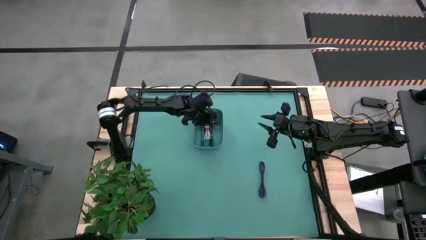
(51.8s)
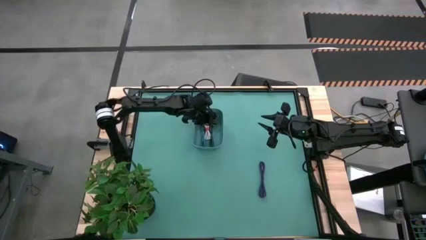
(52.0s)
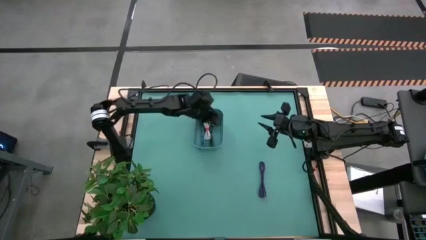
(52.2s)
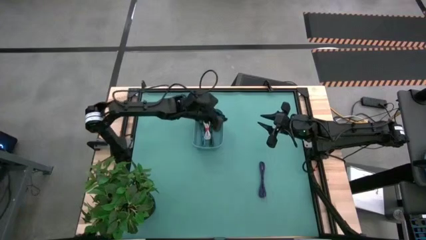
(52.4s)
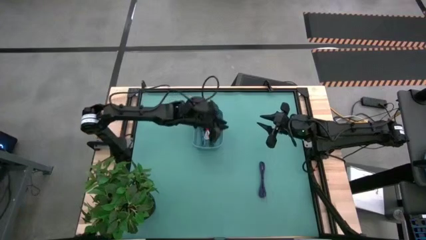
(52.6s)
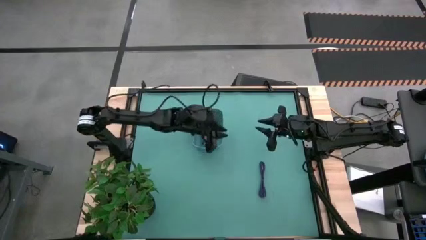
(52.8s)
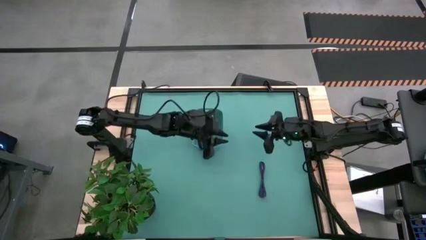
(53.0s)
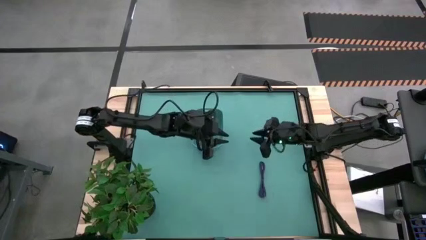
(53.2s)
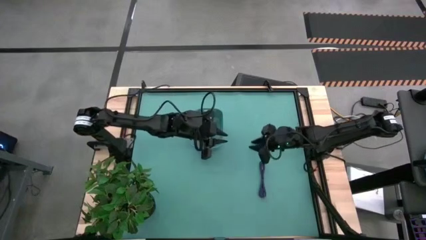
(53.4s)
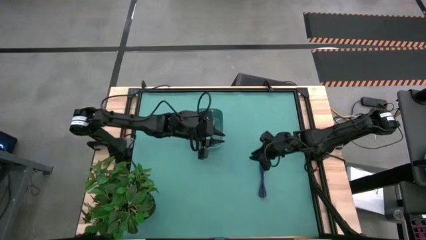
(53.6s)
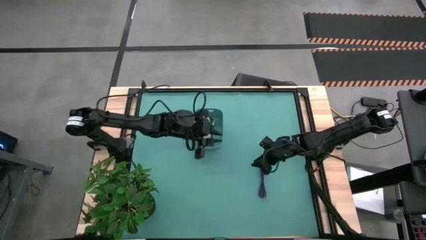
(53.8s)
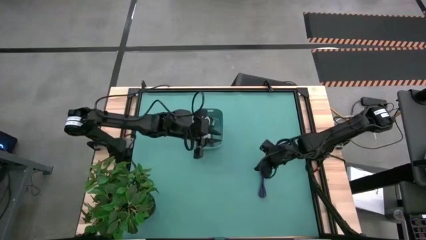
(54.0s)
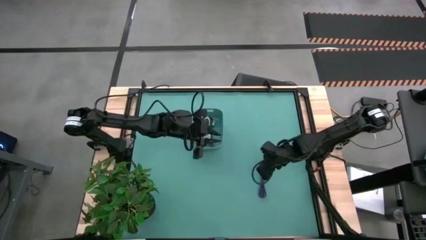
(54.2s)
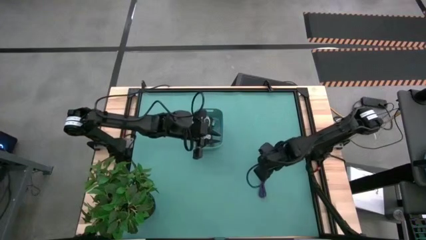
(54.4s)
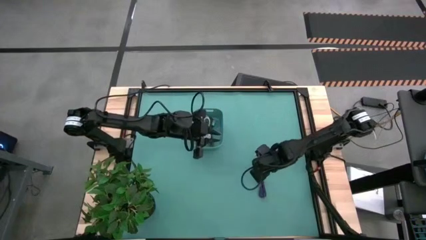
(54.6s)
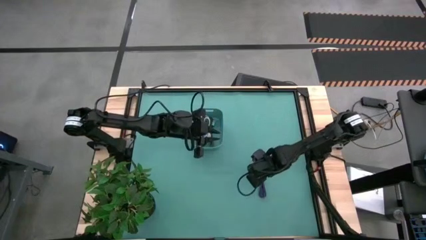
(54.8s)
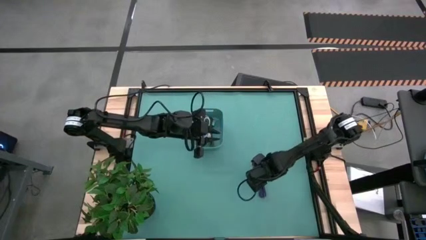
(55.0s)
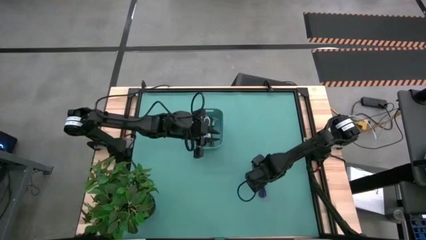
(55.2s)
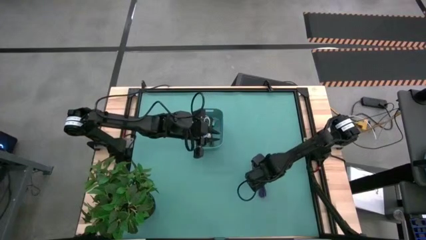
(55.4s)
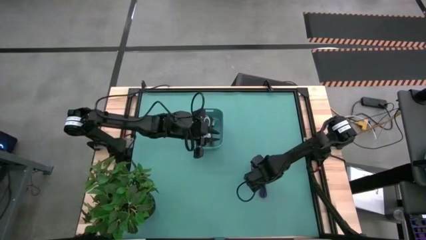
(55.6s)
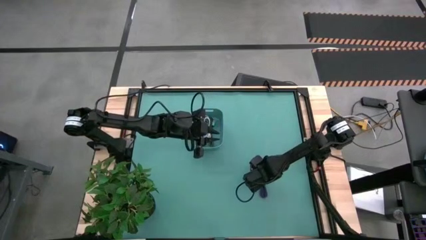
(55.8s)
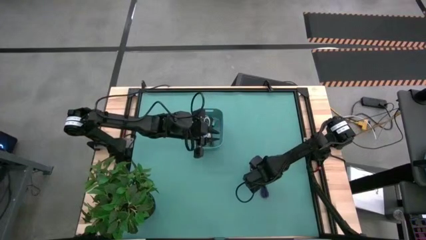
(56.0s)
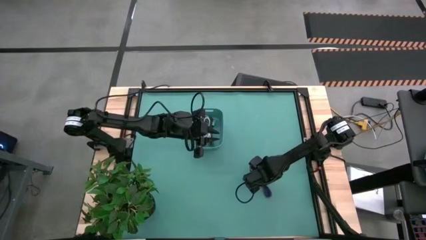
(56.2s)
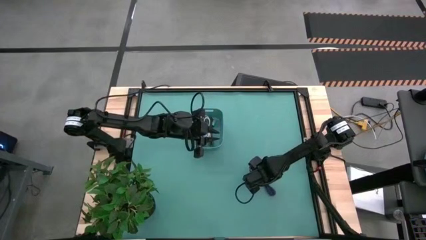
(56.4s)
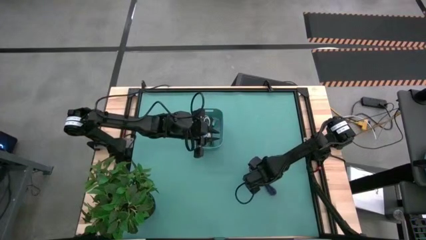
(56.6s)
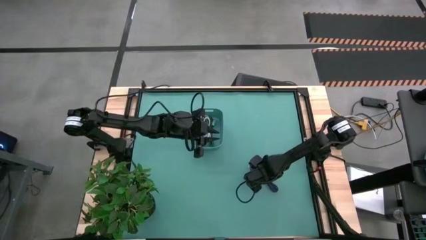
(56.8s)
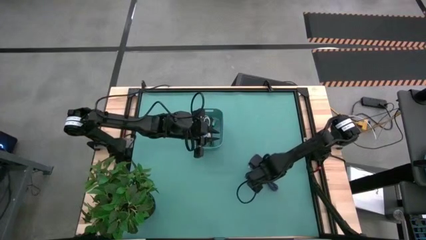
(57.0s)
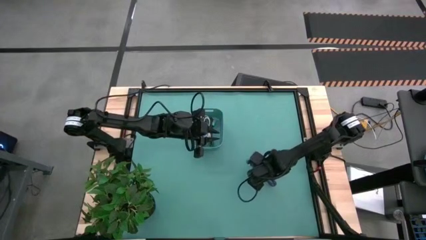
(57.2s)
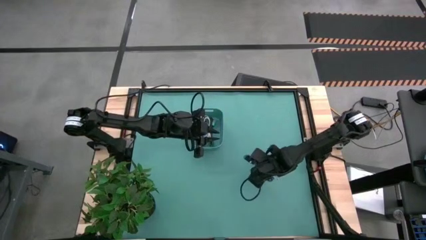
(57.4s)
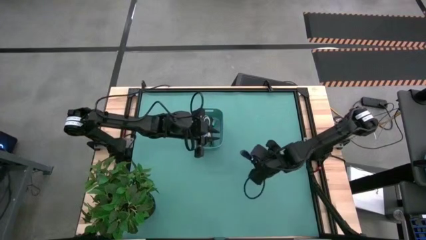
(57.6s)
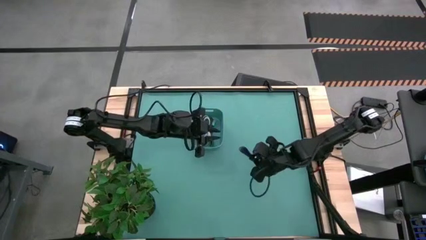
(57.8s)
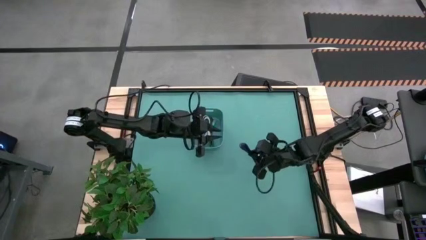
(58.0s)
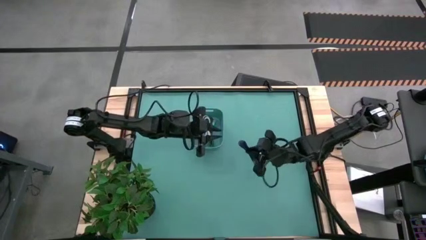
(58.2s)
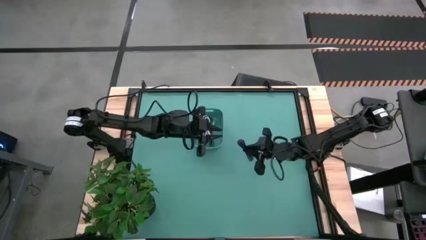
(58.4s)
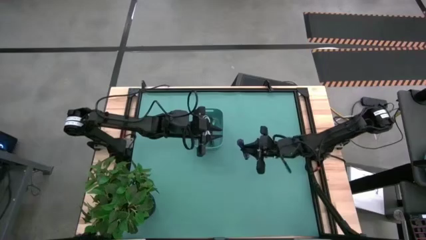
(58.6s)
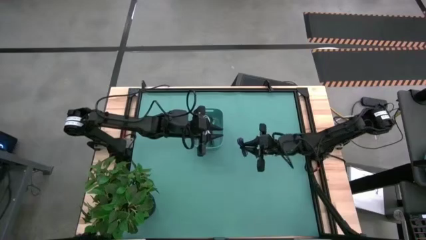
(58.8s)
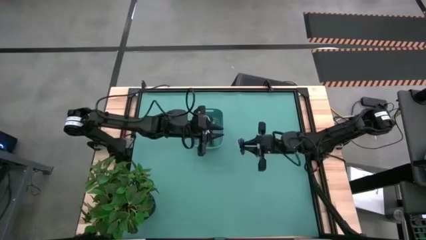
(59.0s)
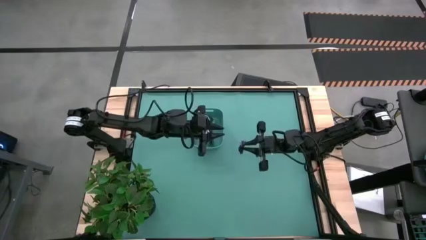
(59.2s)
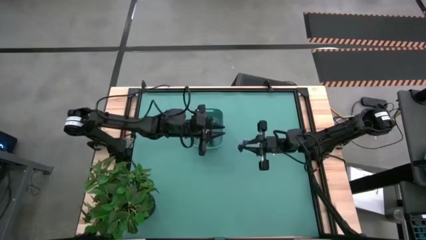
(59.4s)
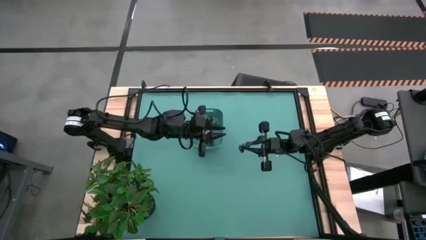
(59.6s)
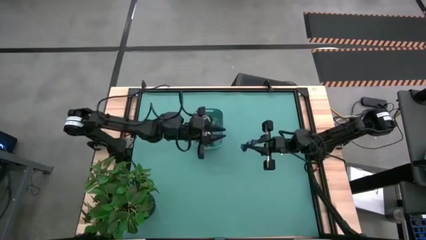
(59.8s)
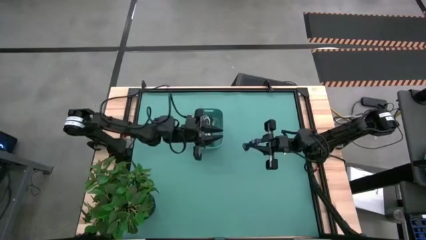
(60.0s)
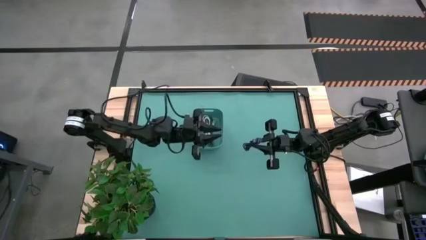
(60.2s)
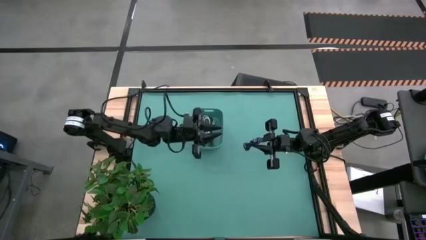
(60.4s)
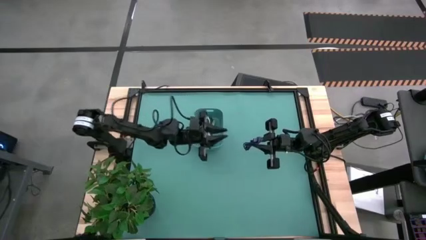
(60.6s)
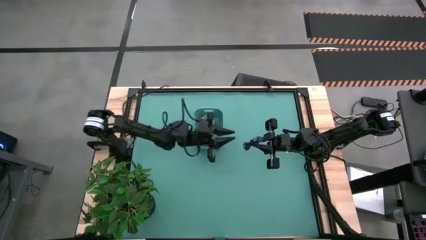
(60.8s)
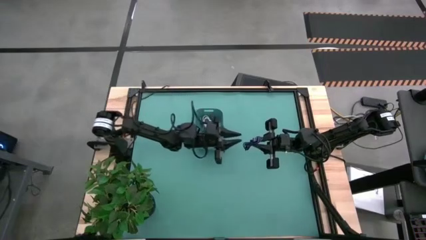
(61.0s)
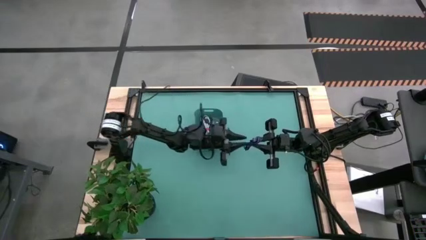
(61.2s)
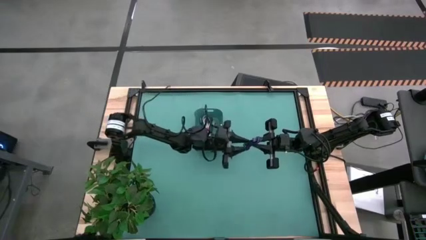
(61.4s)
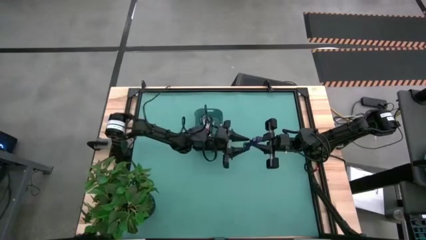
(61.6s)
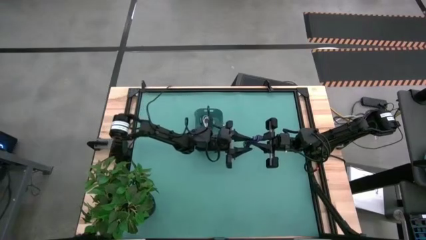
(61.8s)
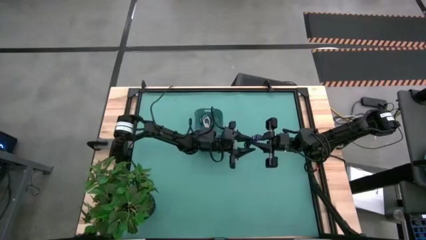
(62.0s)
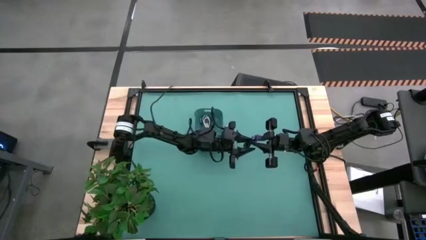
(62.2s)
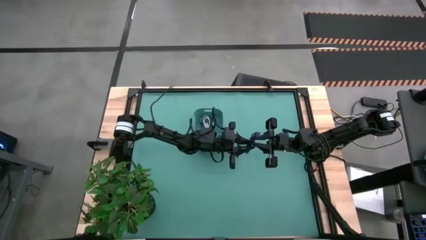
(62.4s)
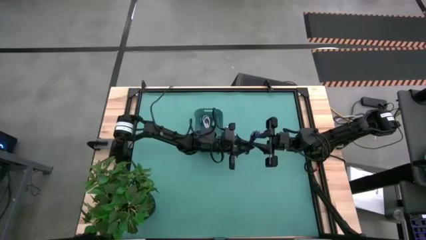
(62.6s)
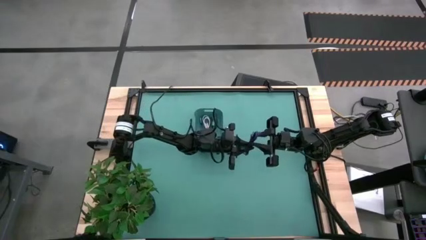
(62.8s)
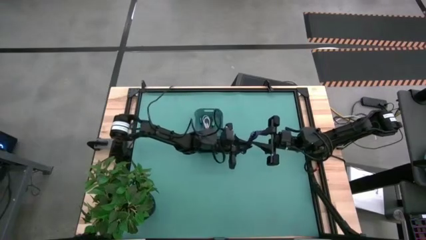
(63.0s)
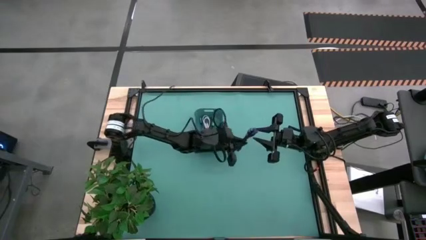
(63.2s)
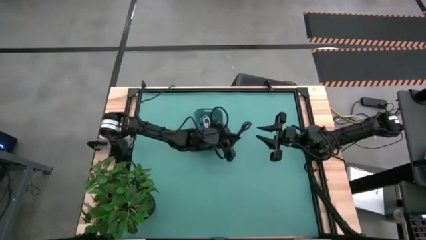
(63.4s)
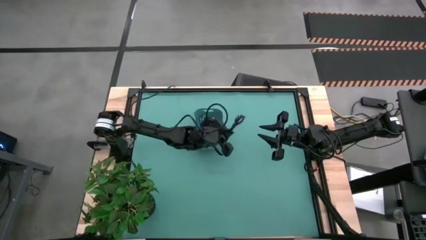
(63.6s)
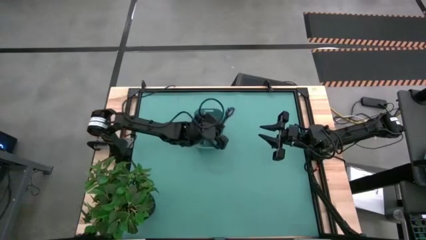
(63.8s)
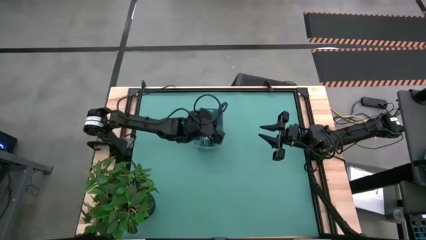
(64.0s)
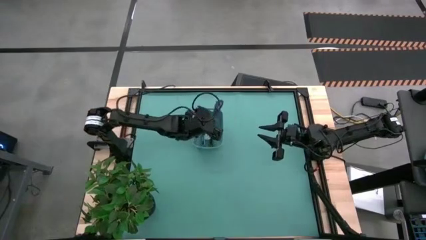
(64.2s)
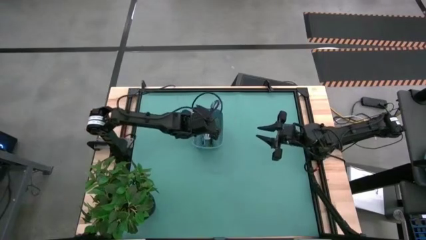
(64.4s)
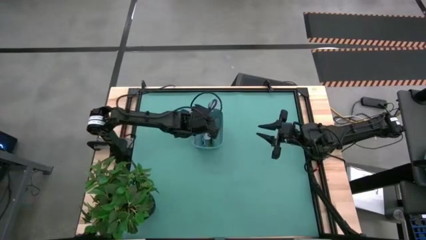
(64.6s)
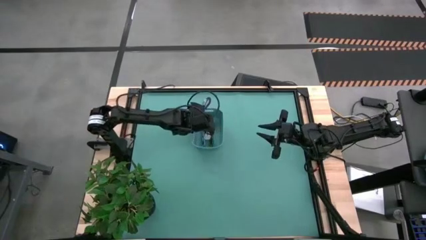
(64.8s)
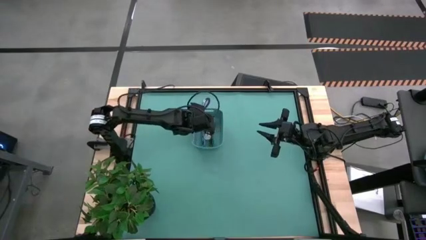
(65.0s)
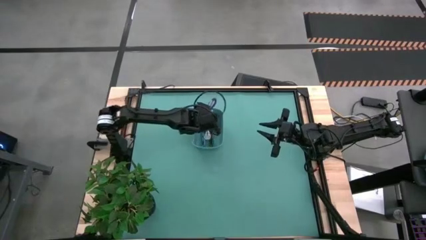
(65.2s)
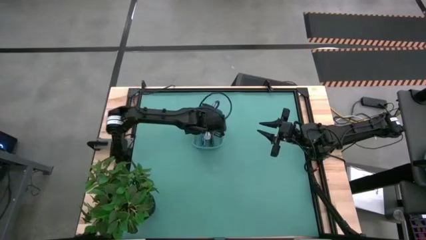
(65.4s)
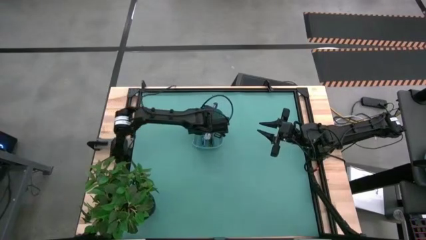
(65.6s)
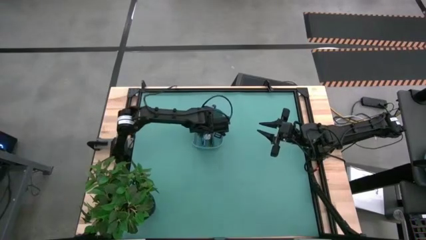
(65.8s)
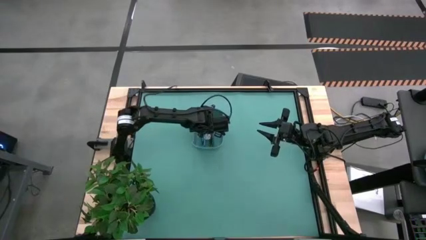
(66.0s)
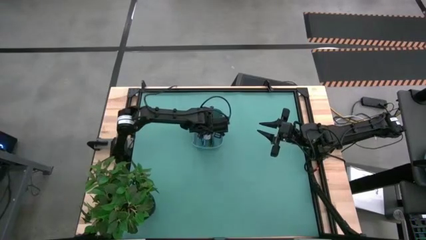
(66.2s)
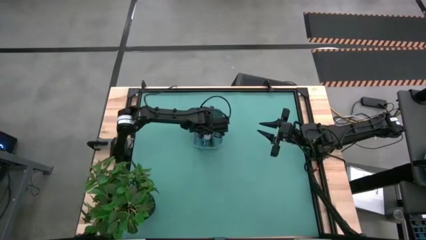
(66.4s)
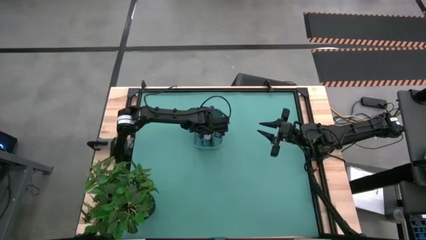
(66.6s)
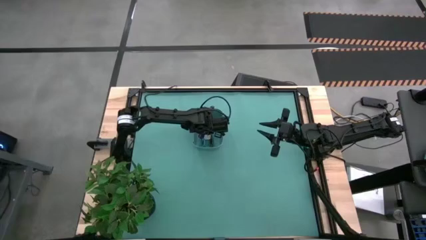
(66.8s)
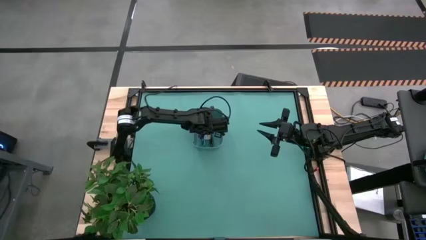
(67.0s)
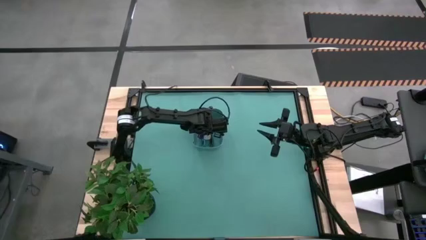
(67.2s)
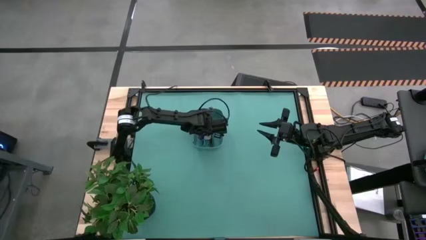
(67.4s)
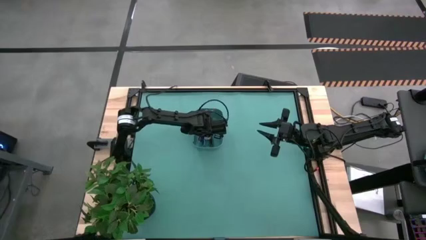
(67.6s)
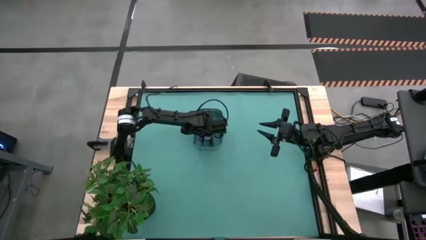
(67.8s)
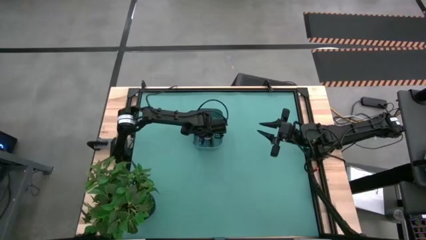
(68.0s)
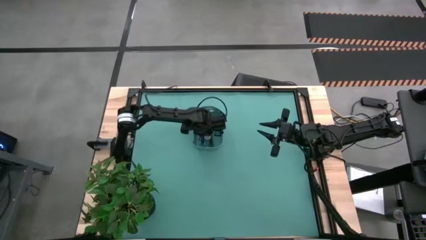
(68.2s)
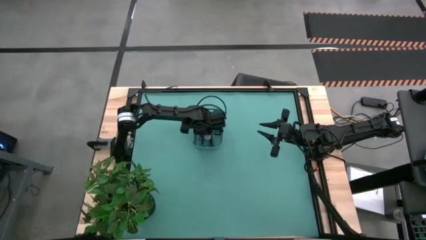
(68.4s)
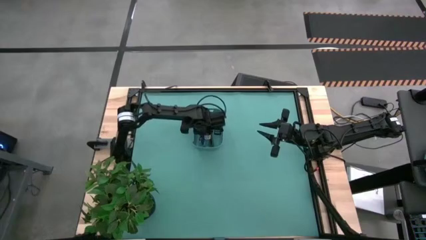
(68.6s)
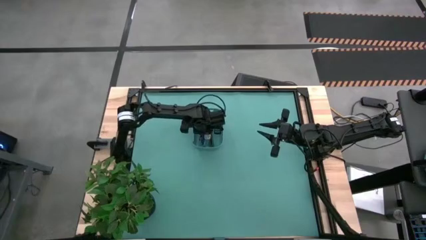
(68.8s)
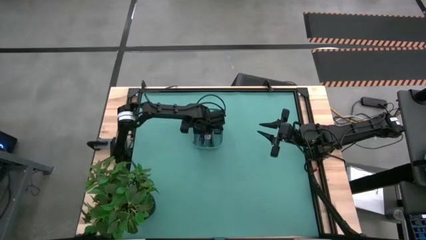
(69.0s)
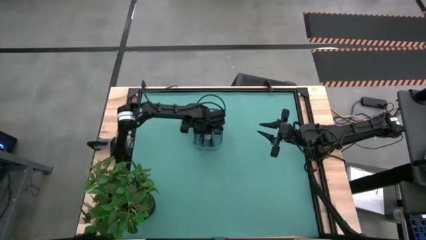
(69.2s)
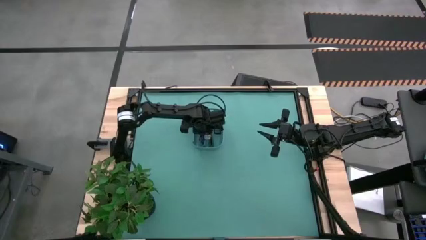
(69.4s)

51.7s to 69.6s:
Task: Pick and place USB-C Cables
Put the purple black charger cable into the bin
